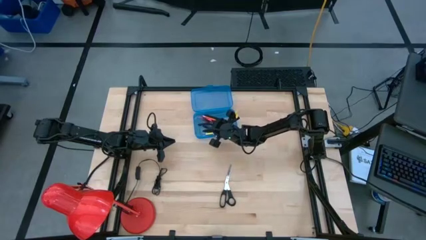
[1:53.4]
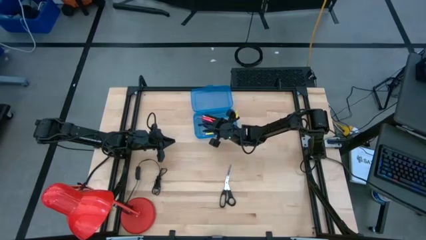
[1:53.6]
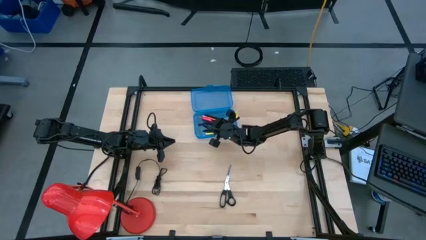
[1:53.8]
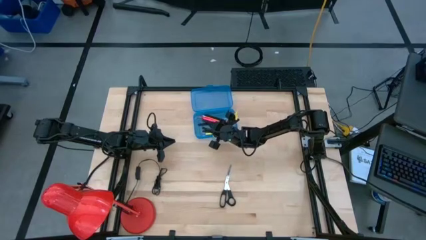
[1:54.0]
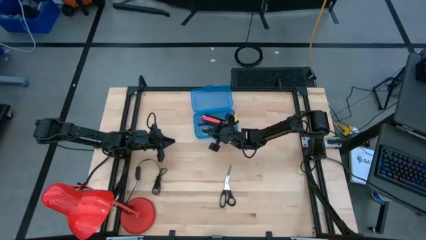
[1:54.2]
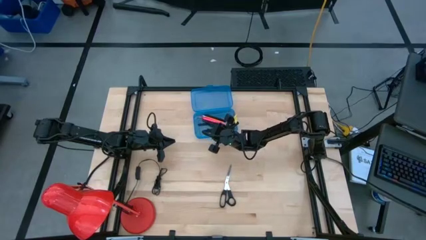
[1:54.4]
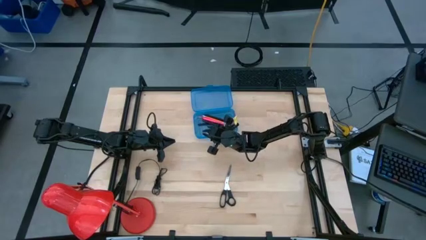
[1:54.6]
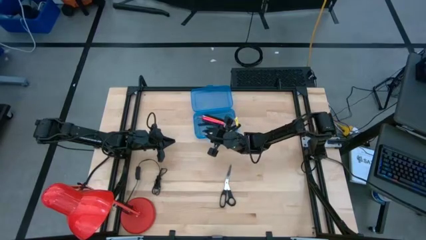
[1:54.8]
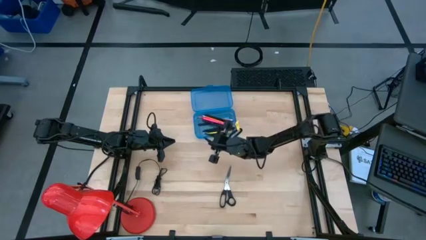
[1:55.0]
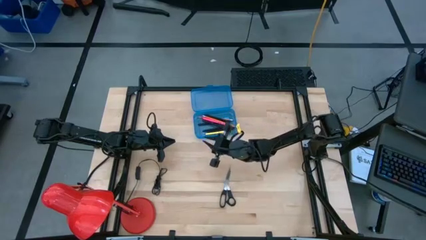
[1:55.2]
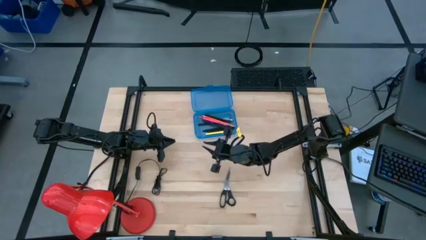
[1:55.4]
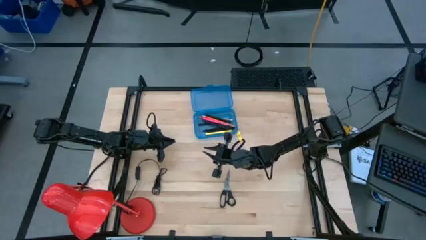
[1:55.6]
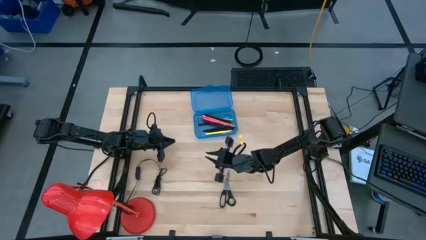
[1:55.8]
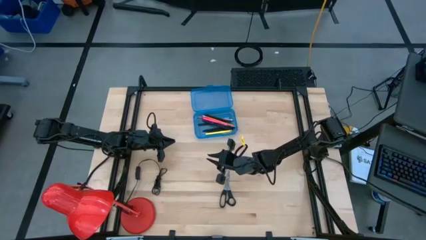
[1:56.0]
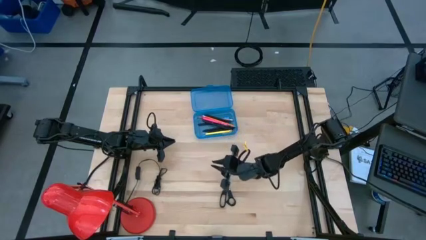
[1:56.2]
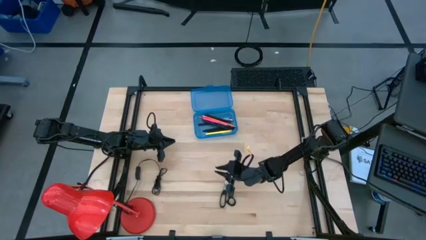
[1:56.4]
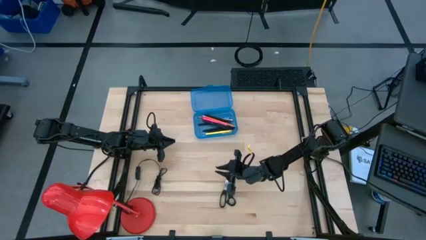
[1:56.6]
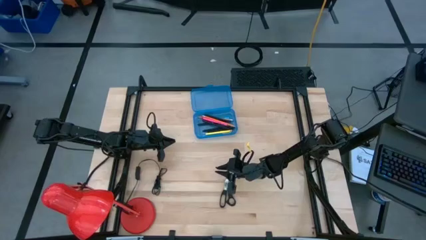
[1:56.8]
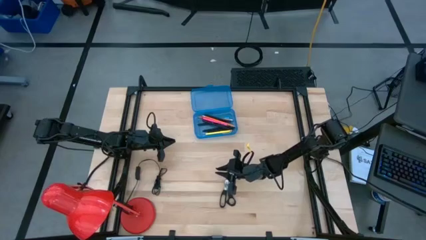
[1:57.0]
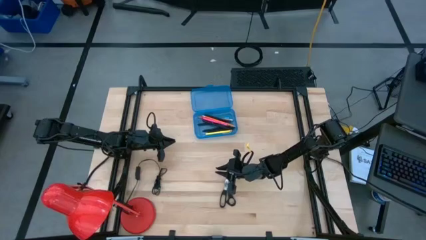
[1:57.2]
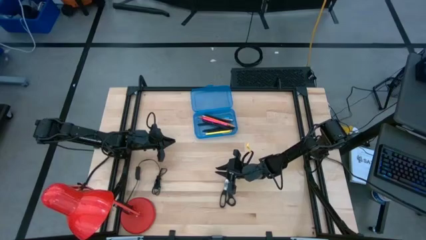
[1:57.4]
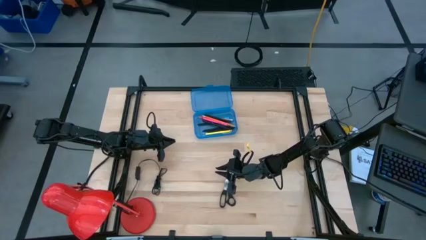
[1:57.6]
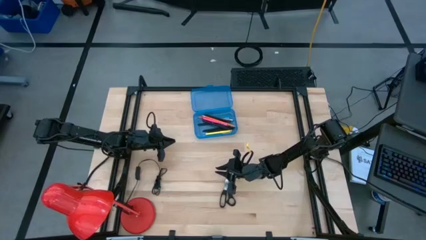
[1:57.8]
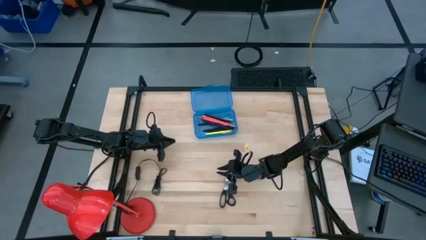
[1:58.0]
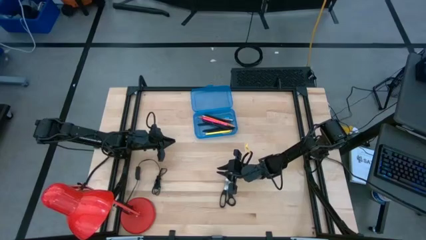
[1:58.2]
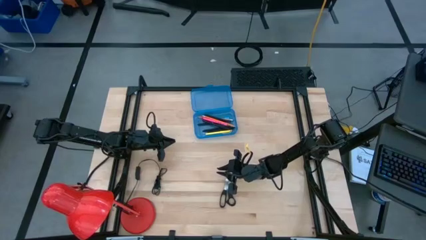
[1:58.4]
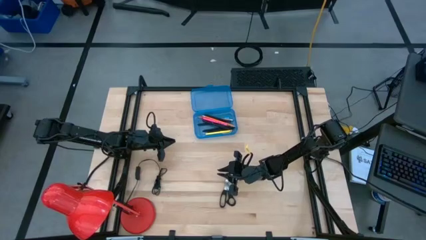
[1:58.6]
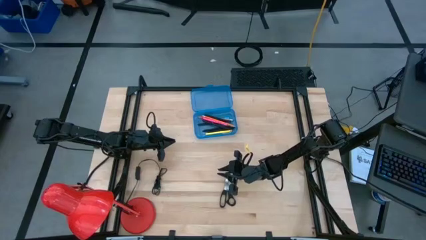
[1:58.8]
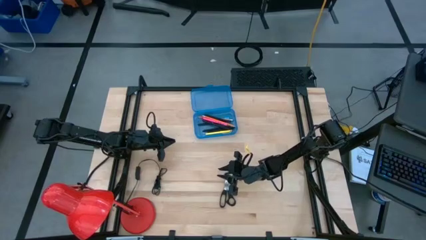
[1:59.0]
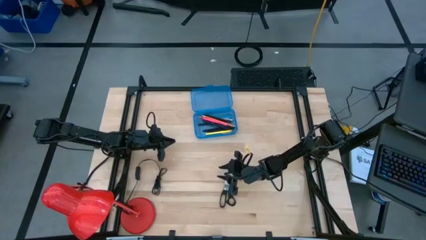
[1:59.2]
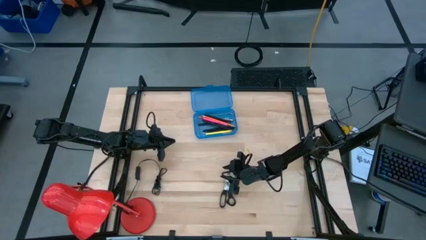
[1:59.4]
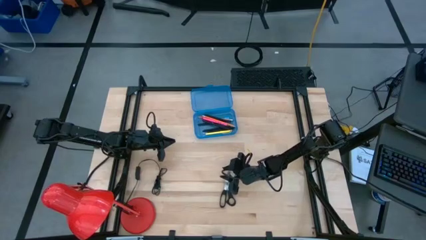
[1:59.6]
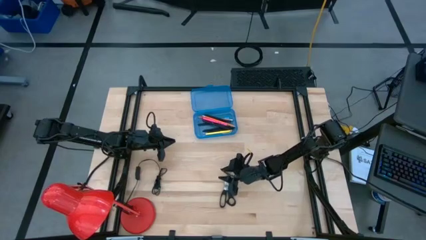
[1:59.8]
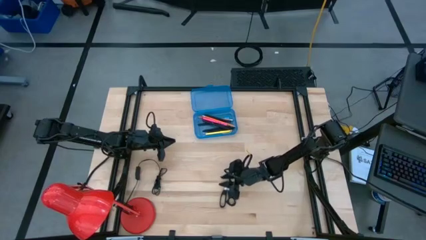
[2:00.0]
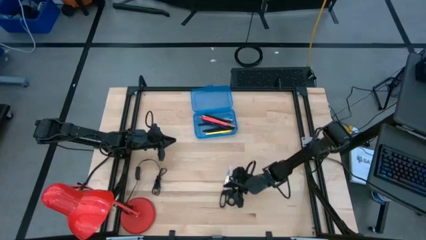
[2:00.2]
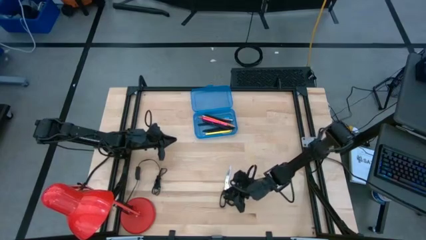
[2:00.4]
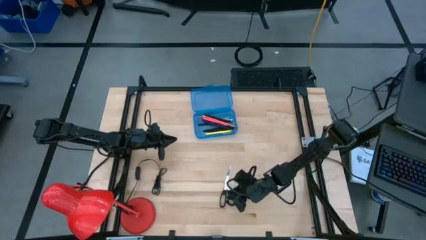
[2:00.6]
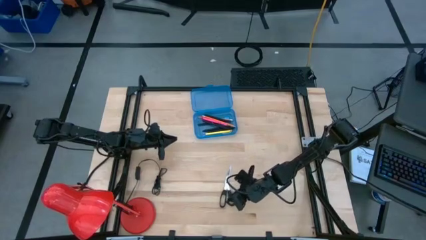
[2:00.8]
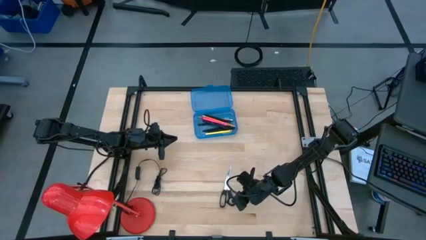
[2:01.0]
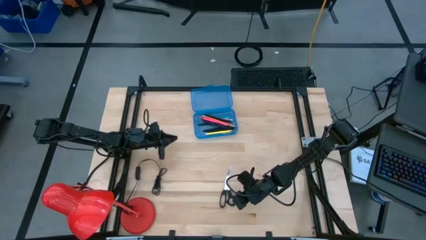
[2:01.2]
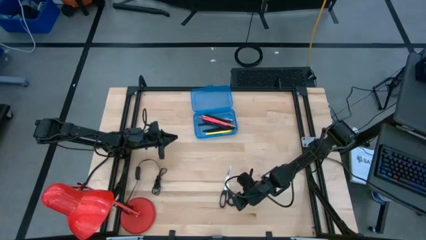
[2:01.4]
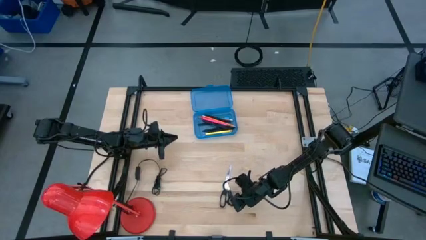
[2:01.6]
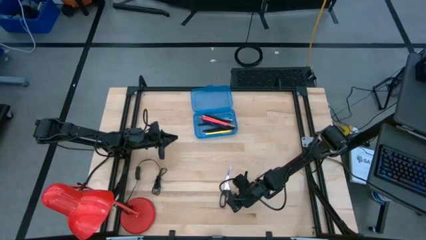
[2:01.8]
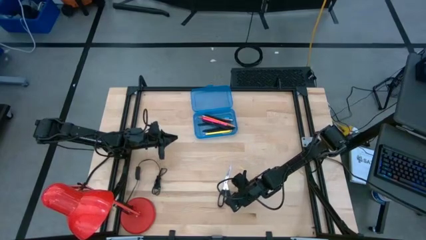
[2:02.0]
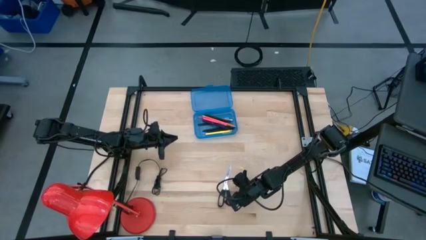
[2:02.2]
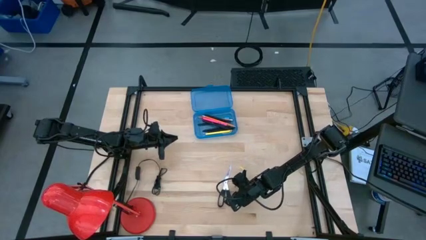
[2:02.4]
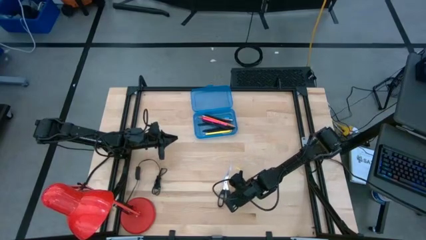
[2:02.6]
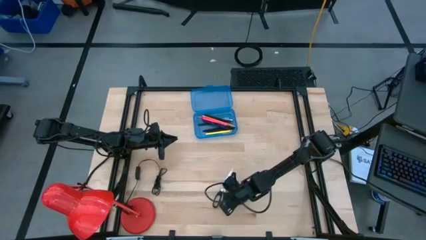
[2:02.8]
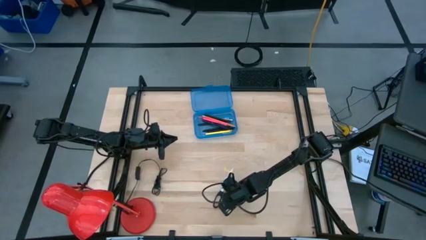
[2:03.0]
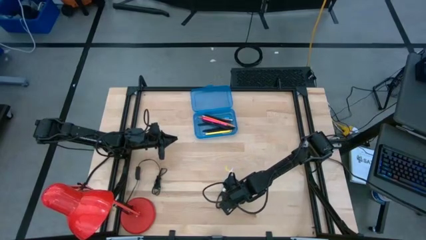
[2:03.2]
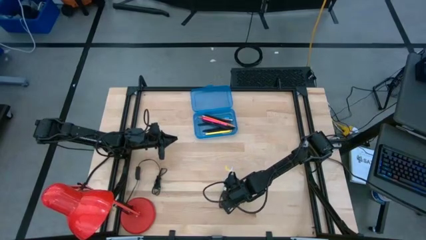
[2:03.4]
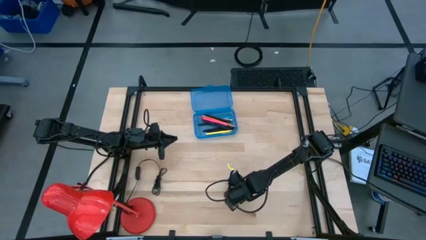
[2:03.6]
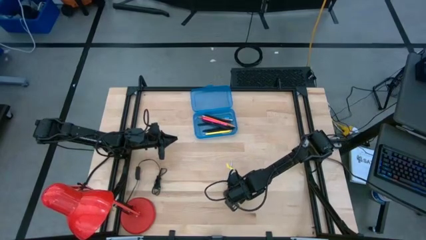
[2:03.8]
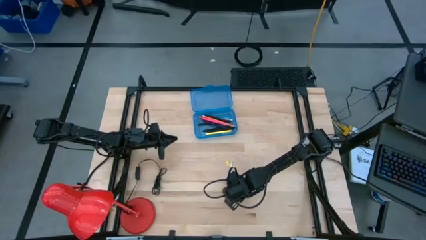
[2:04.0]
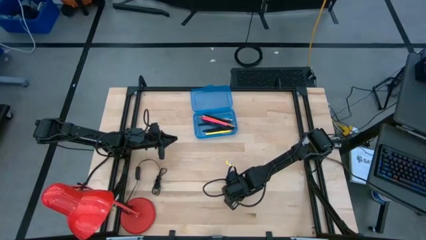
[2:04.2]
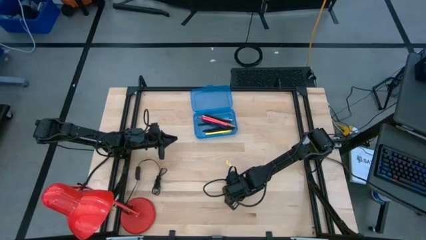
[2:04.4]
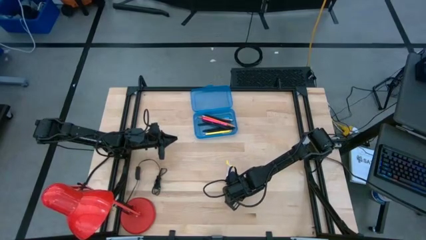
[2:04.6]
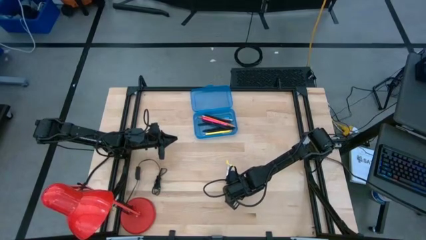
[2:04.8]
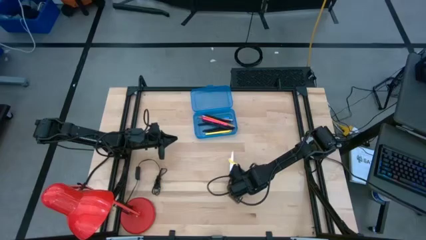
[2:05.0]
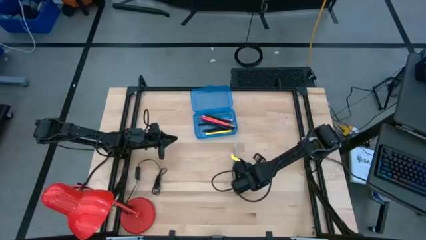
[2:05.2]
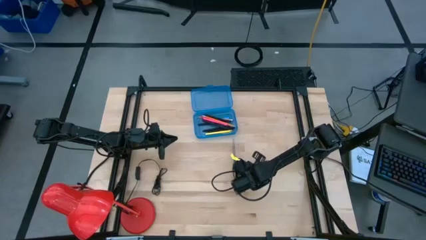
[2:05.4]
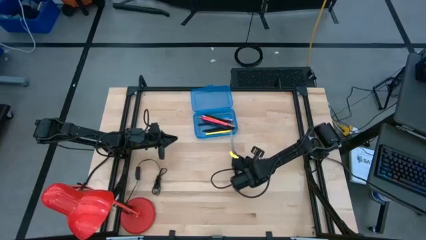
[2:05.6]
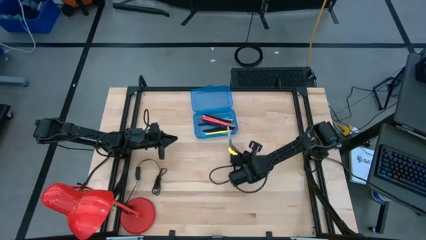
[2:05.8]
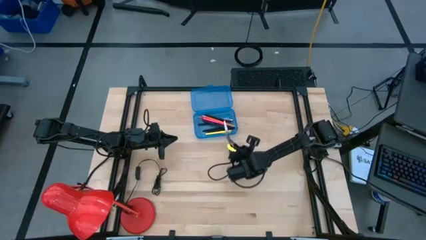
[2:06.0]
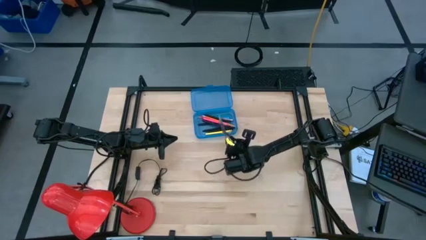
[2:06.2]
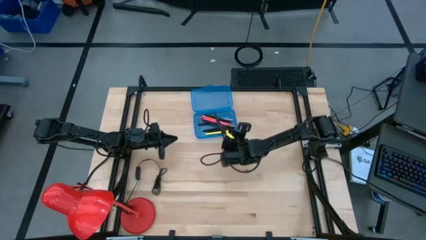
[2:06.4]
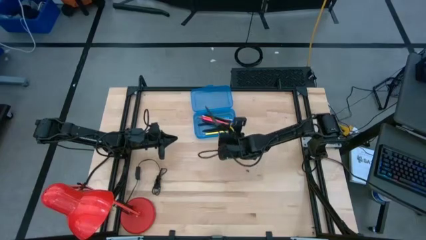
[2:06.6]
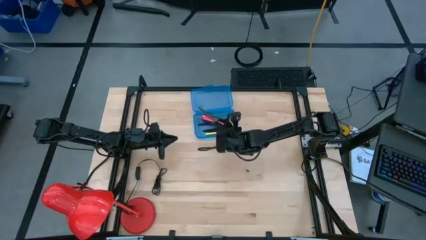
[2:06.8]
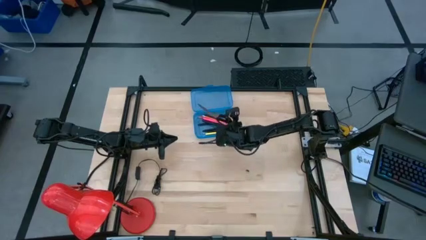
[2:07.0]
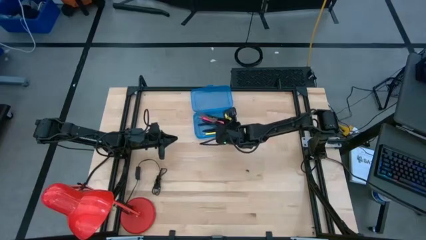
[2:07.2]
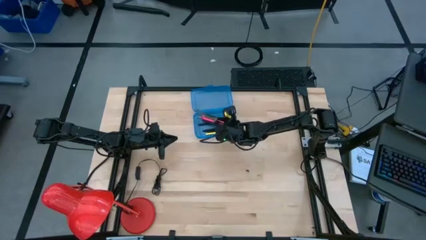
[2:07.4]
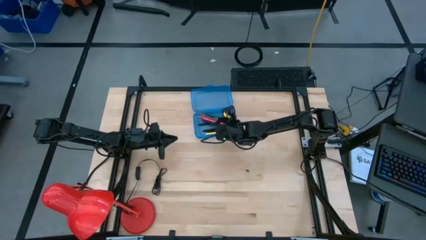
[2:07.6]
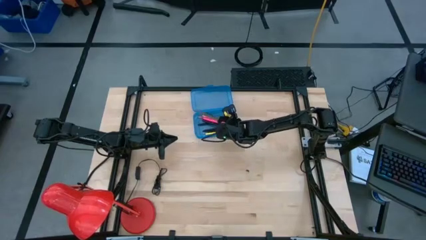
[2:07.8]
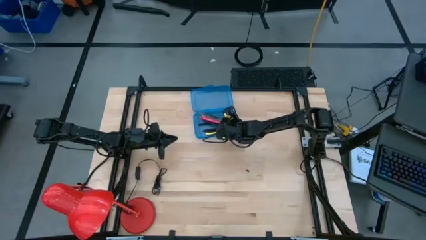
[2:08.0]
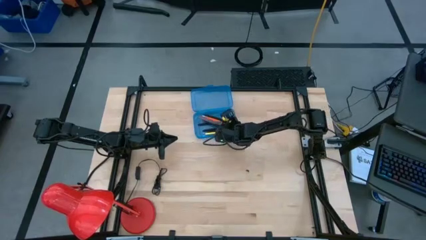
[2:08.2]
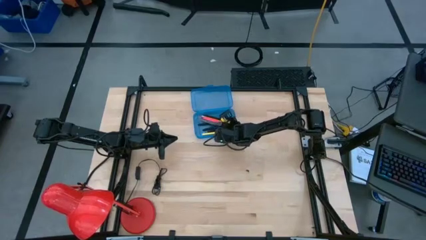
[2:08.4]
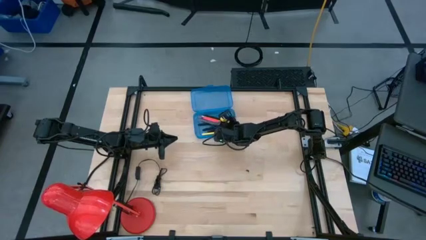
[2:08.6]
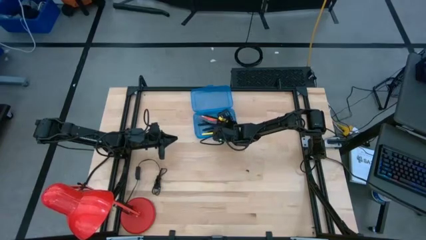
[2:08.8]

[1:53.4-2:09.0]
Task: Pick & place school supplies into a supply box
Put the black scissors into the blue supply box

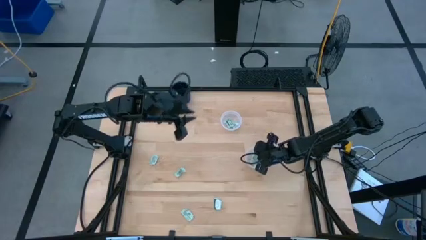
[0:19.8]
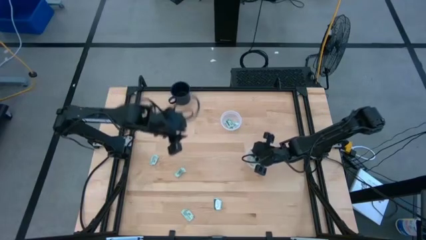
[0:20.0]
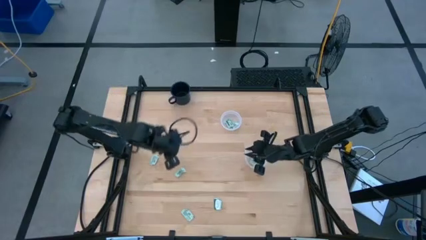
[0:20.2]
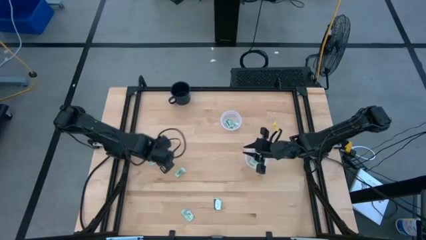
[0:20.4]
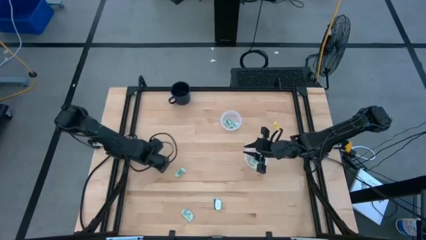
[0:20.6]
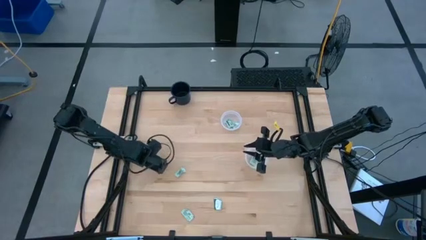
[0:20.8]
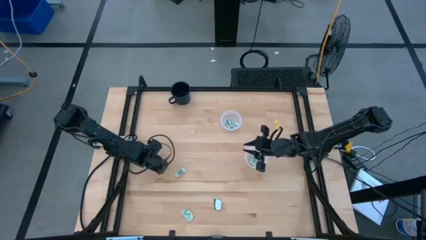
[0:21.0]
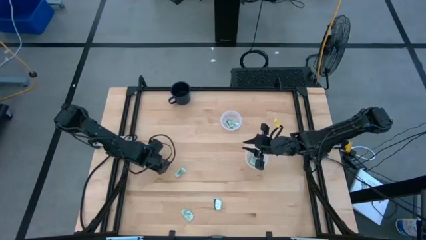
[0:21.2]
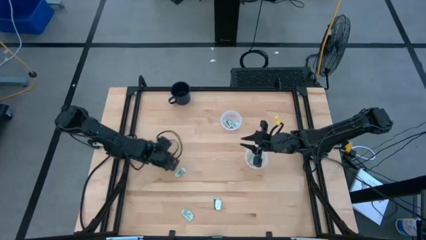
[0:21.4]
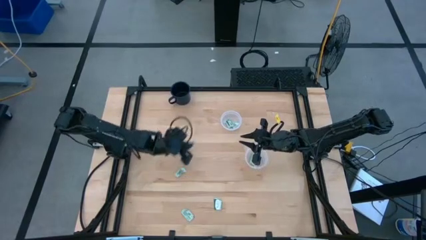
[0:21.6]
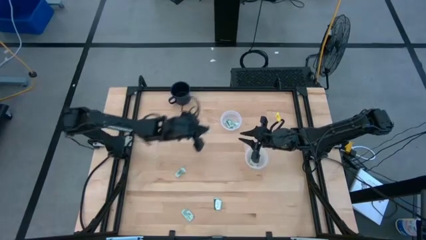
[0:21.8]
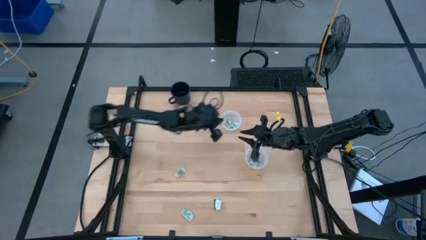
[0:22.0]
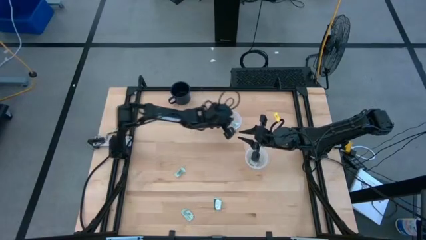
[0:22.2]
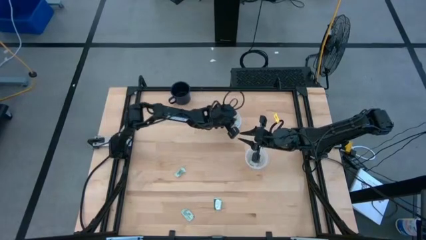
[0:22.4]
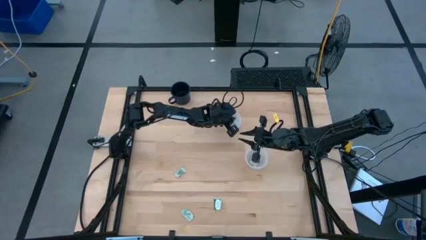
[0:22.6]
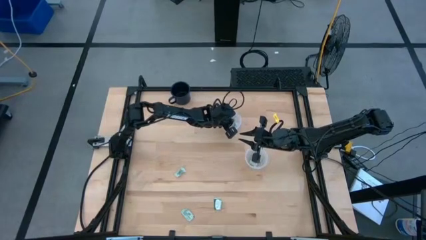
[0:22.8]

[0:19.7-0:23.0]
Task: Pick and place items into bin
Put the stevia packet into the top transparent bin
